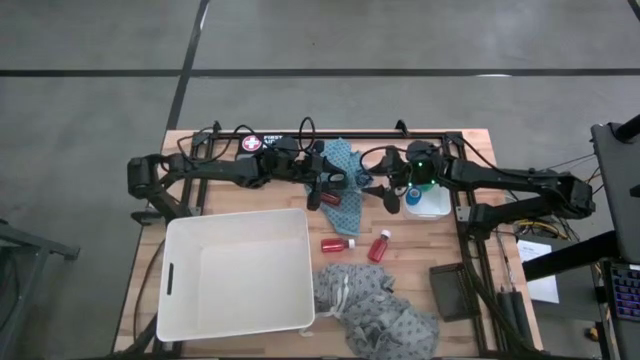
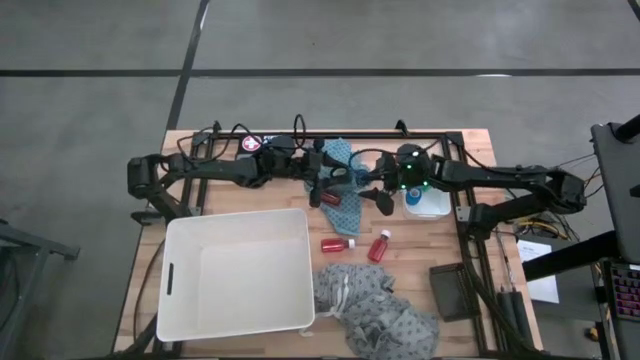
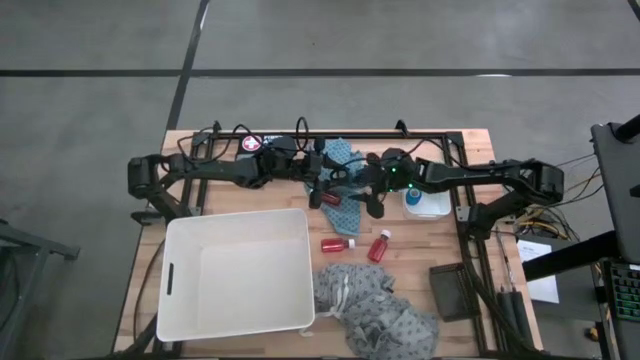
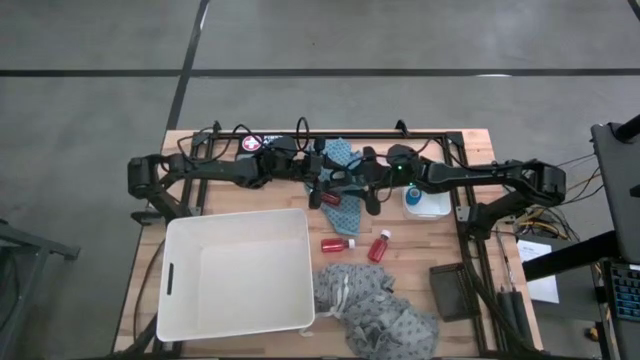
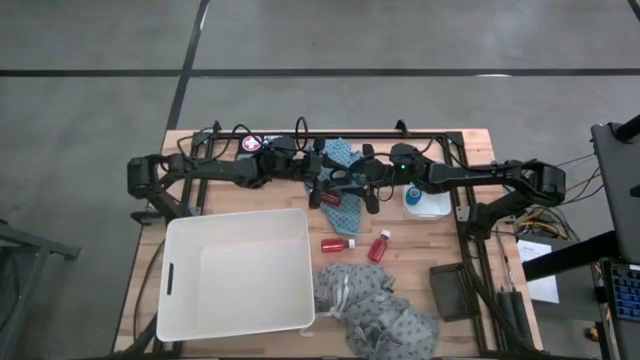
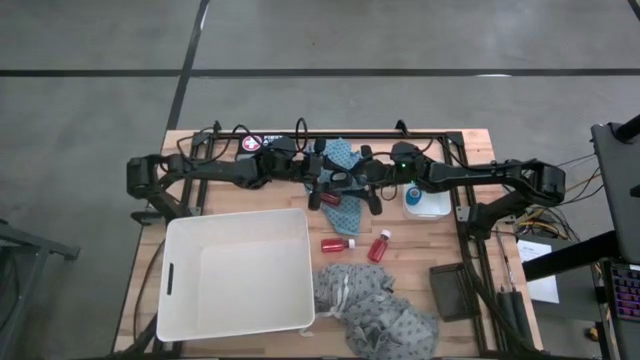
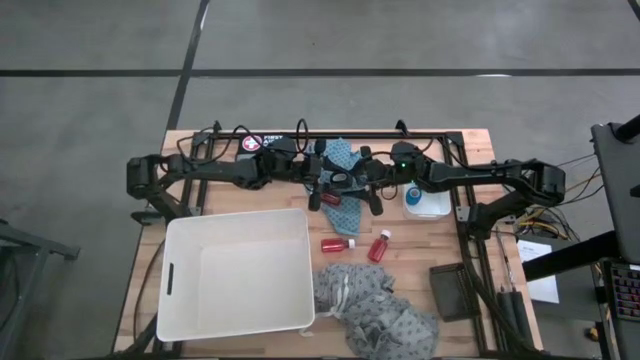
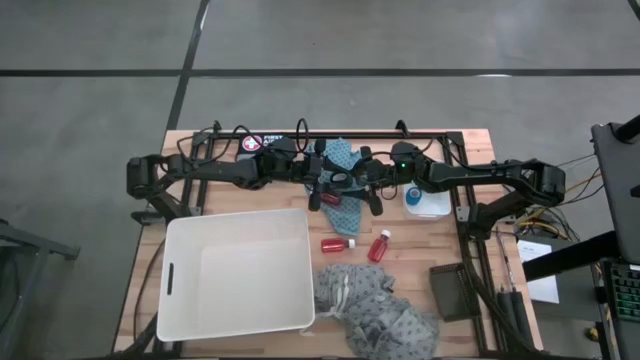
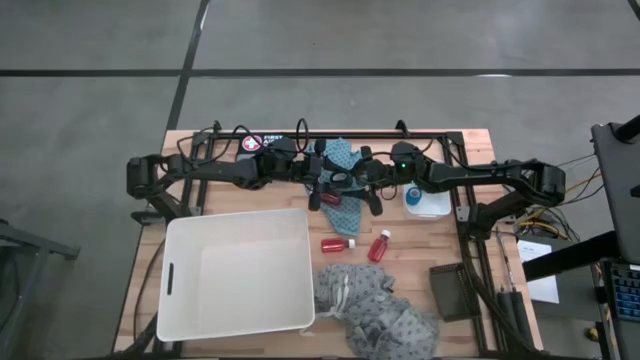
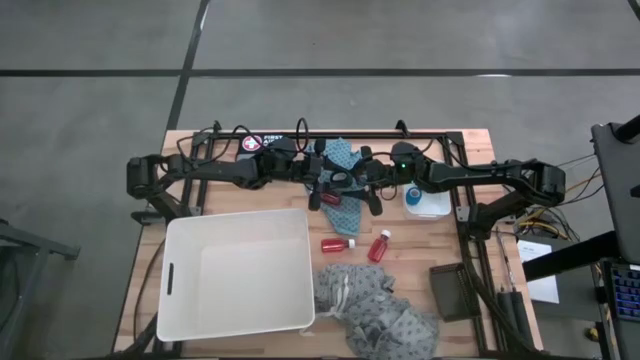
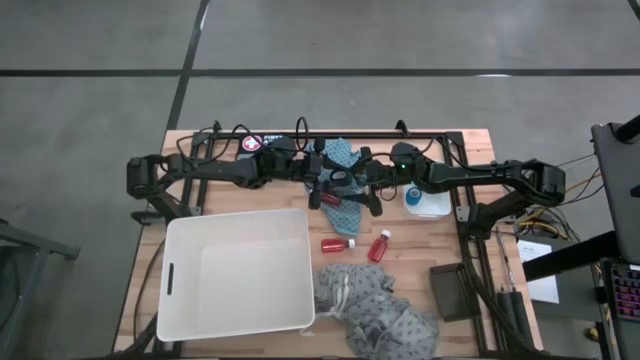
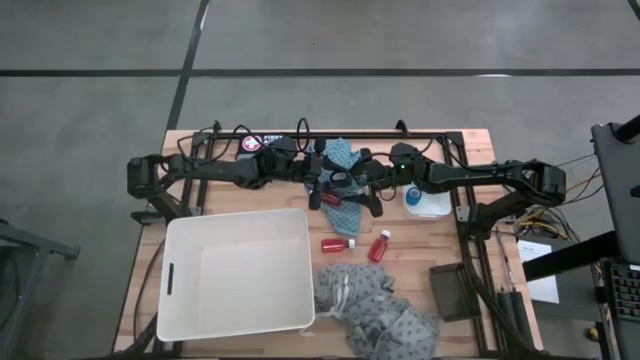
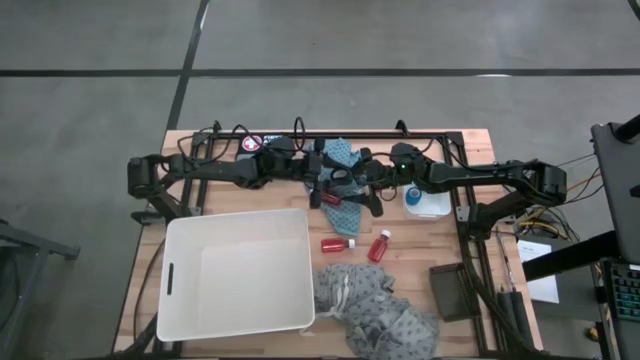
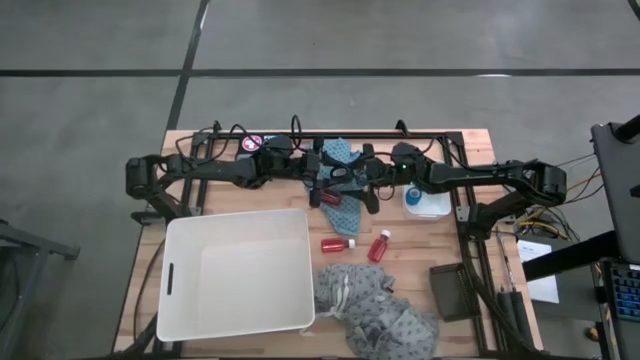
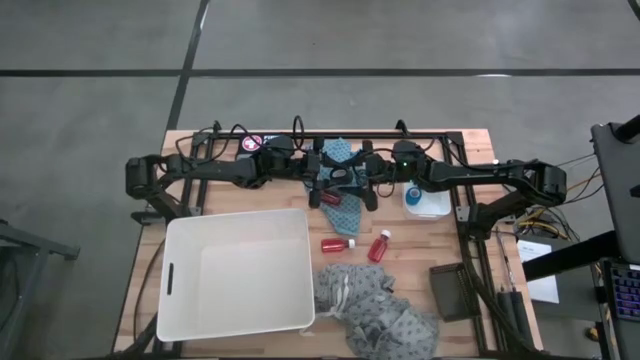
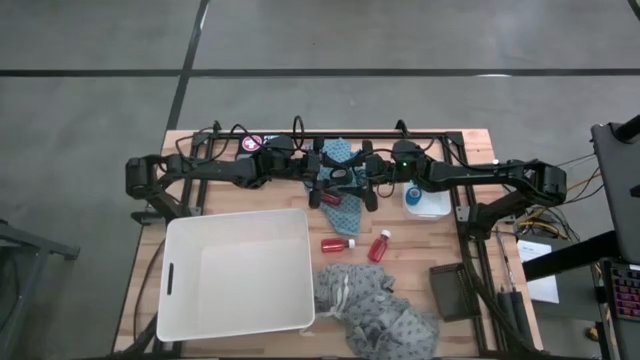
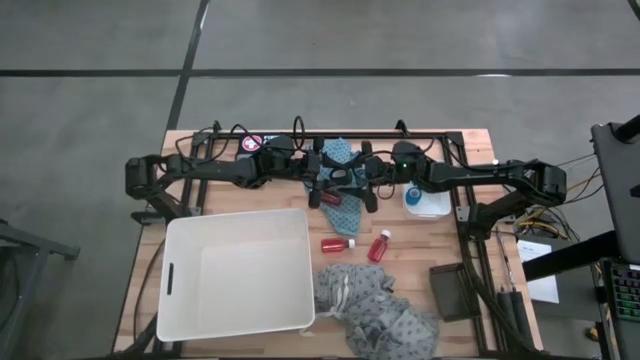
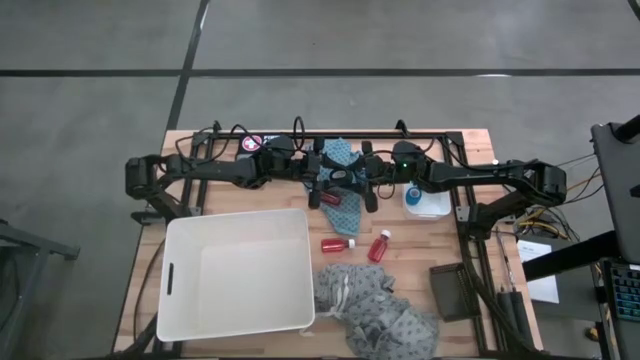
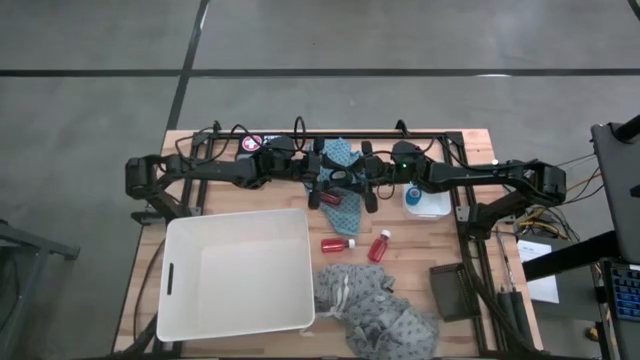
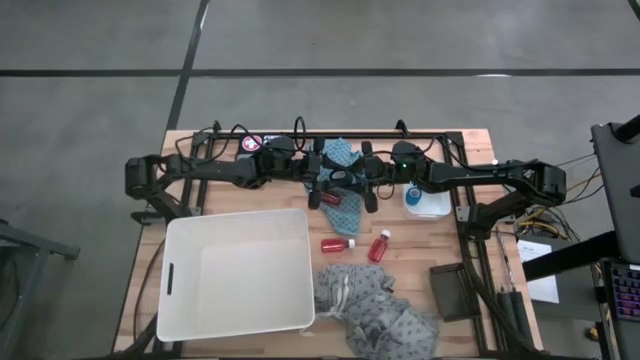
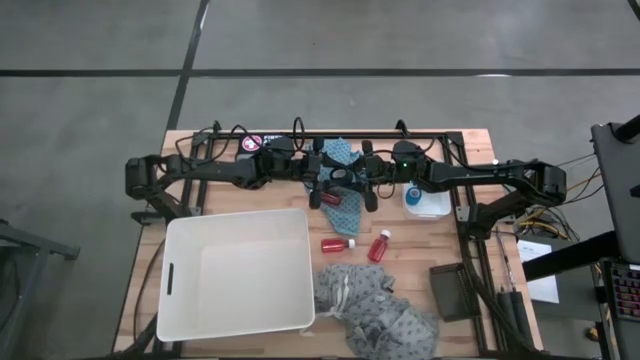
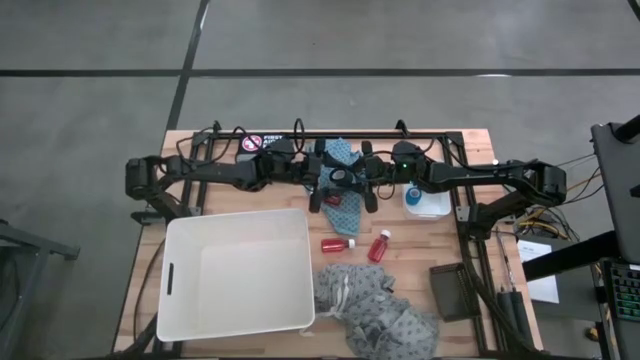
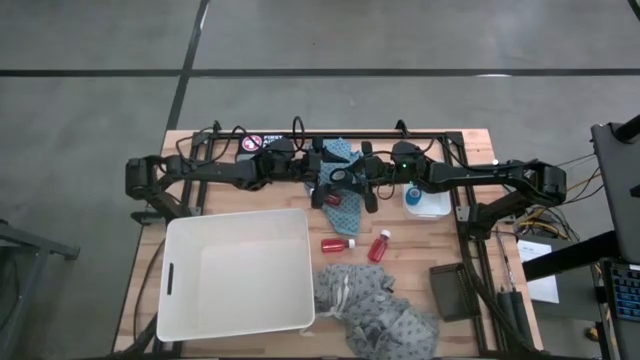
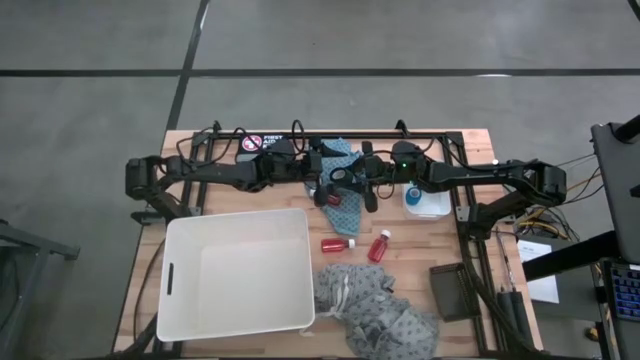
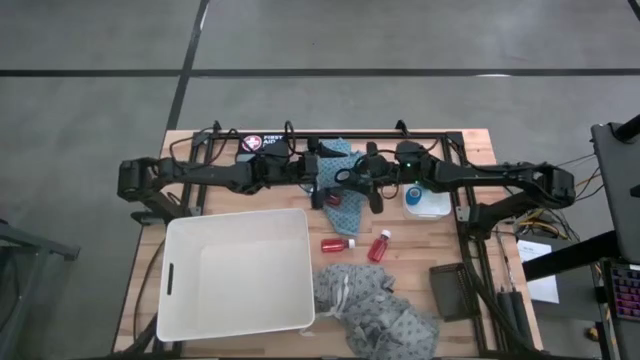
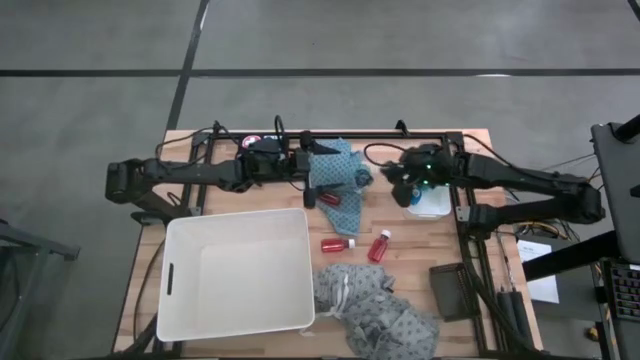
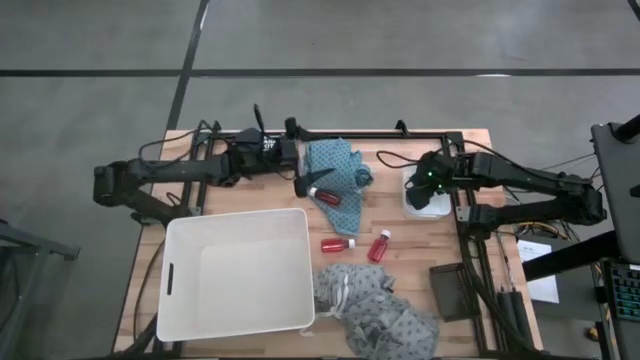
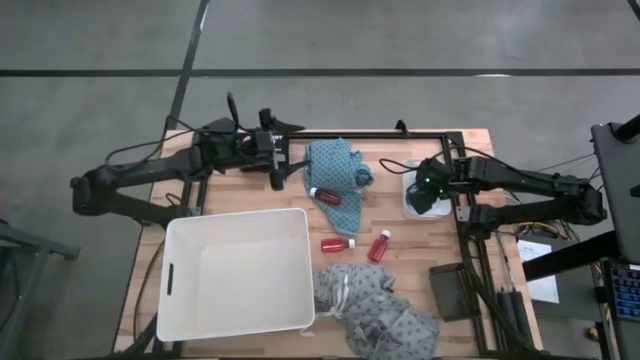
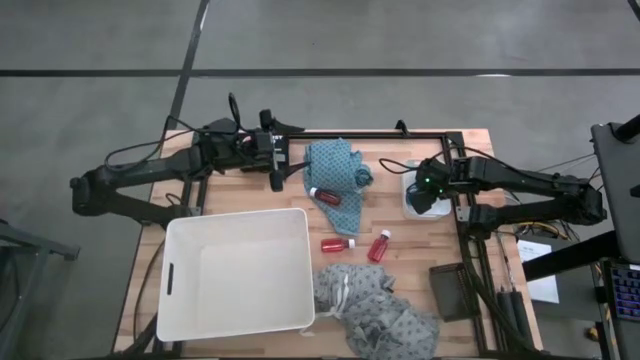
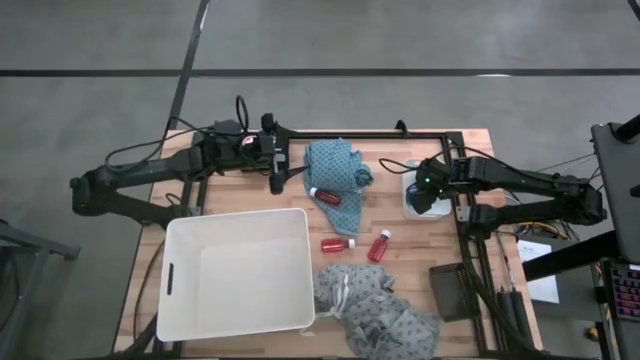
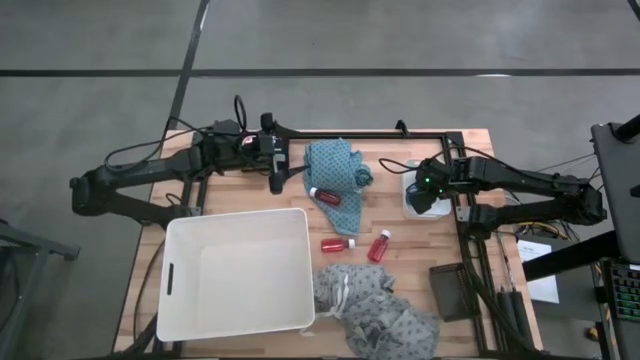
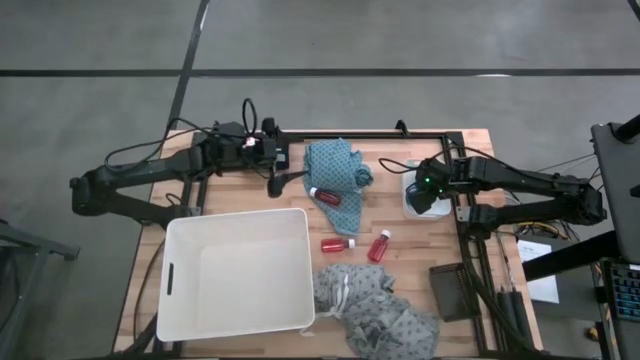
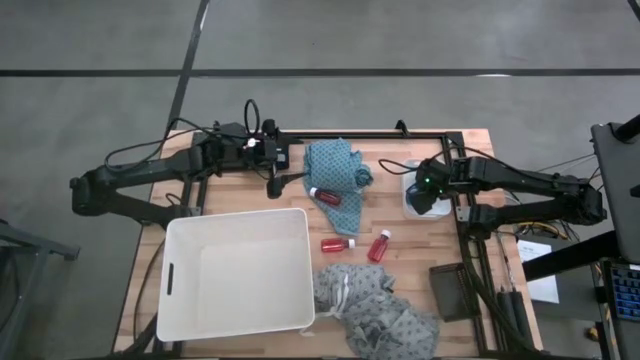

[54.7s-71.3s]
Task: Pick & Place Medicine items
Put the green bandage into the small white bin

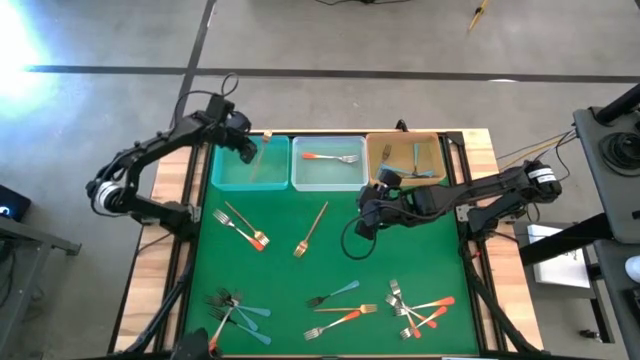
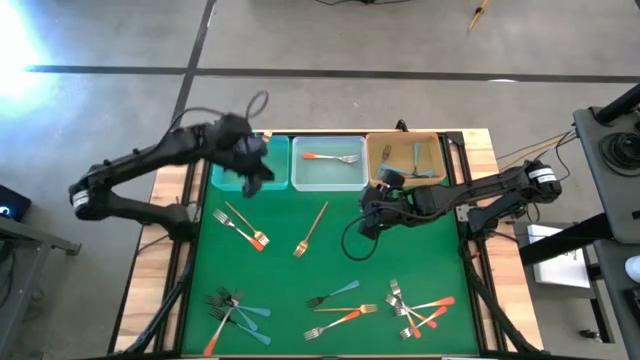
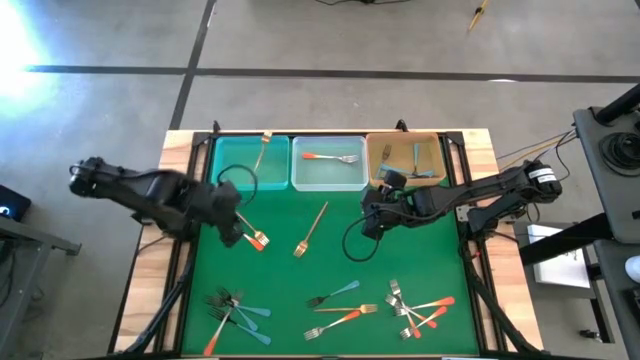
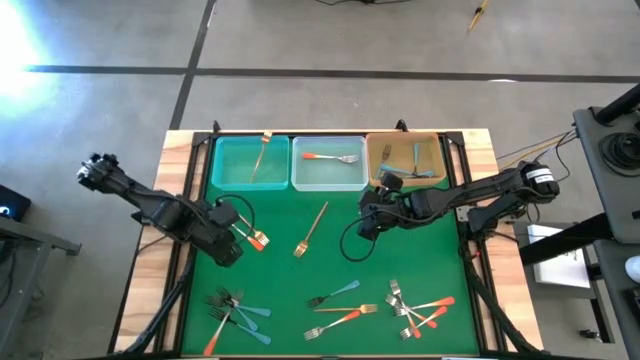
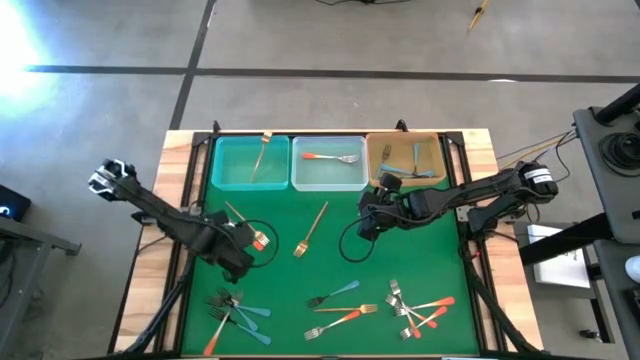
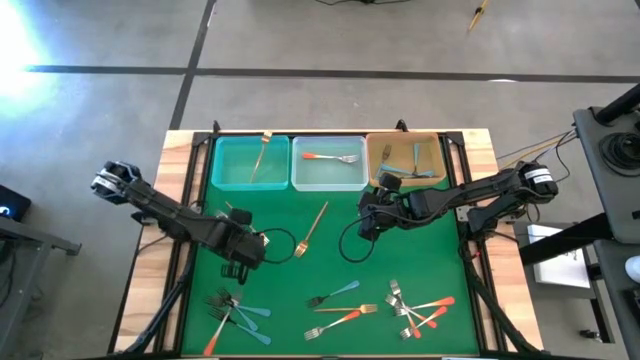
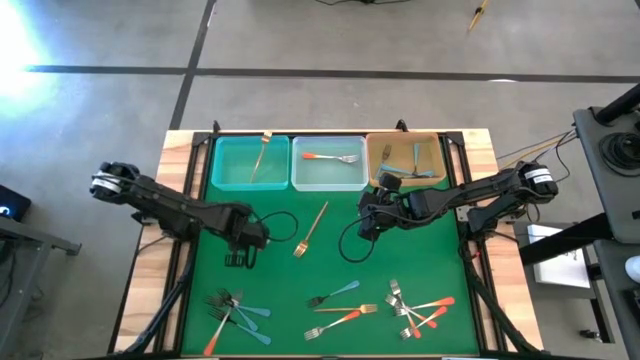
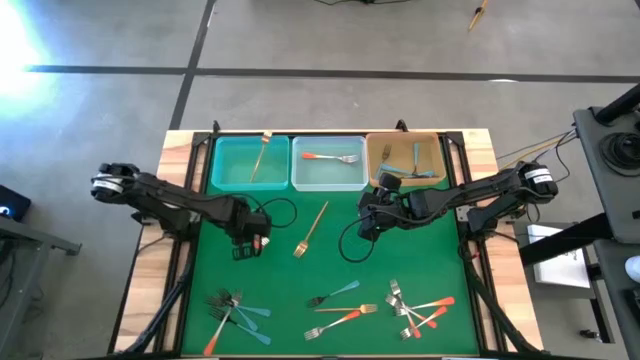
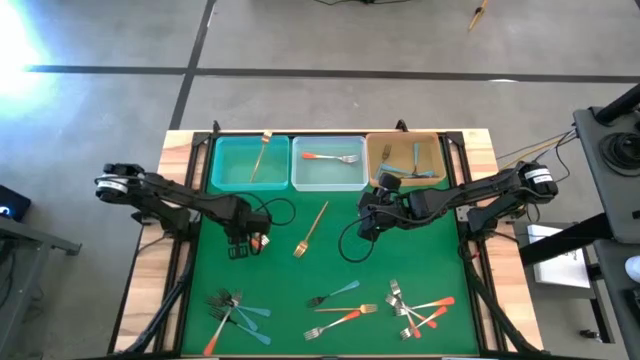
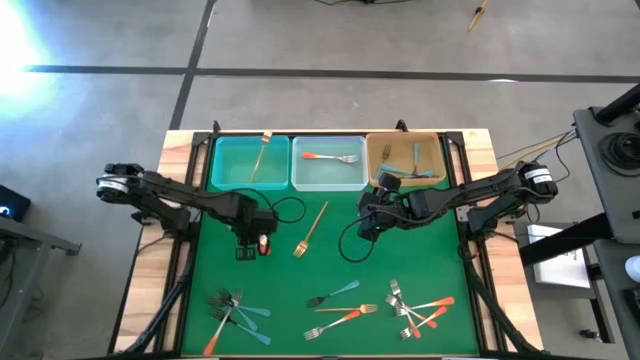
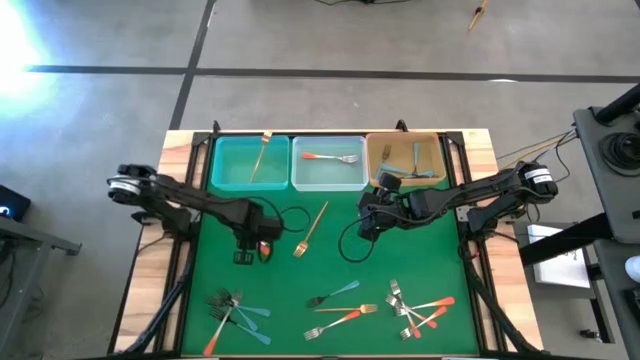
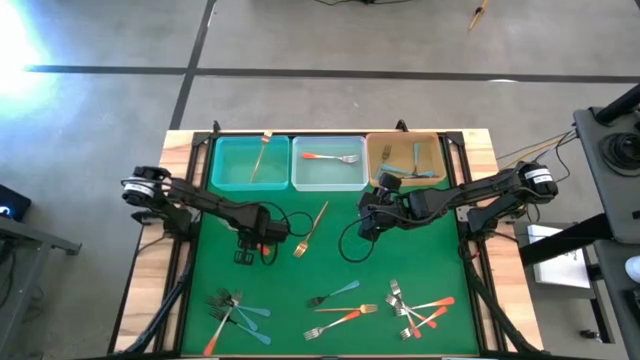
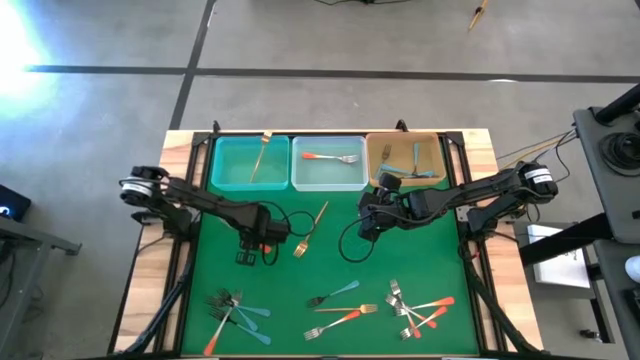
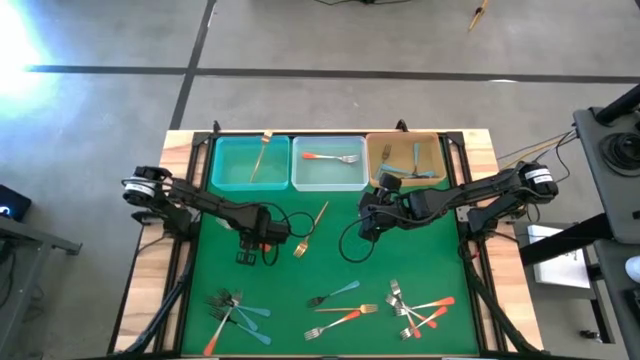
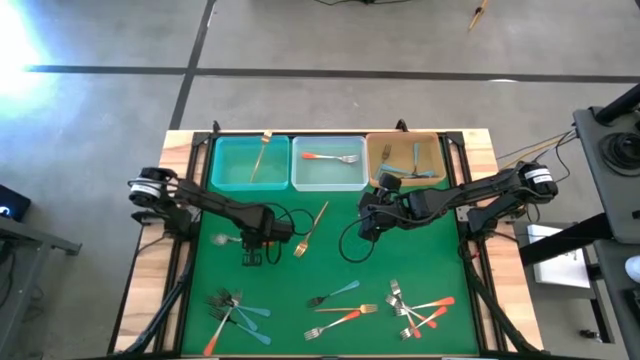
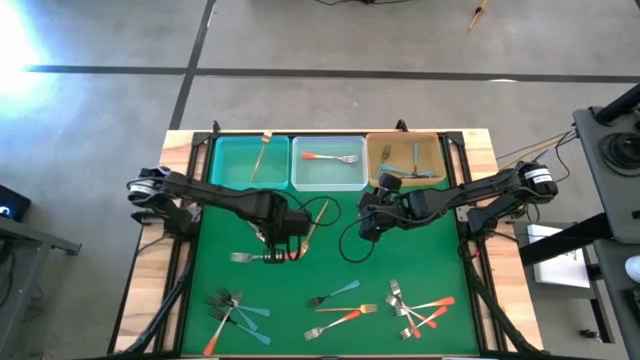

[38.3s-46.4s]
Task: Sort silverware by color (type)
Put the orange fork into the white bin
